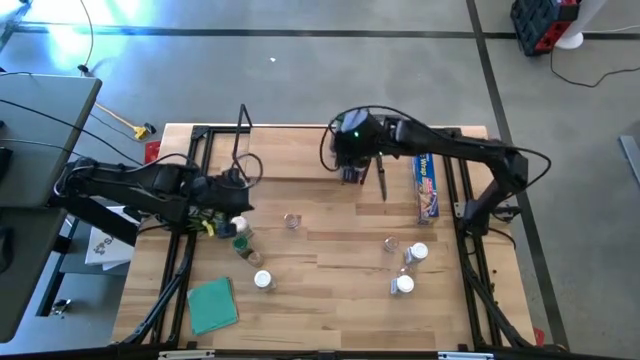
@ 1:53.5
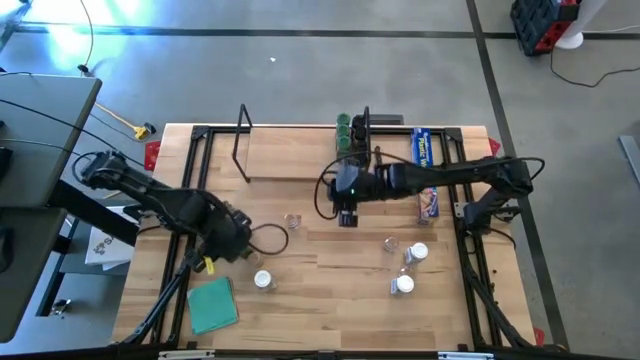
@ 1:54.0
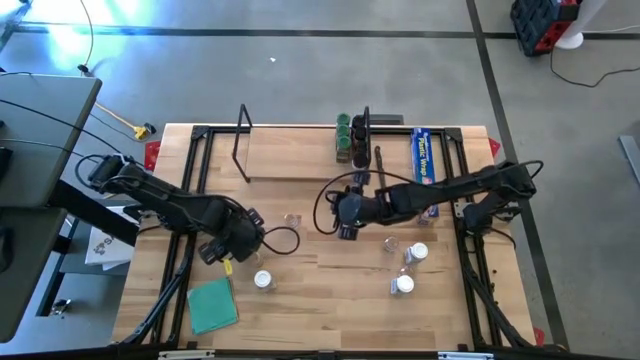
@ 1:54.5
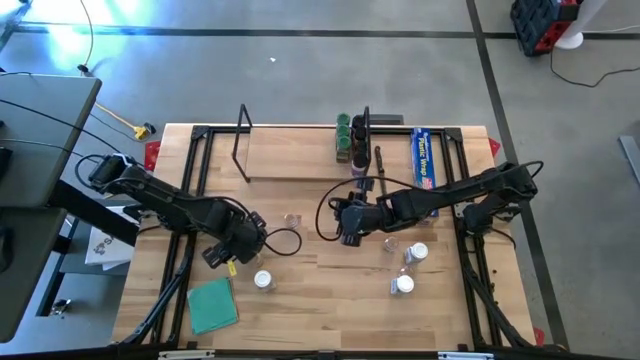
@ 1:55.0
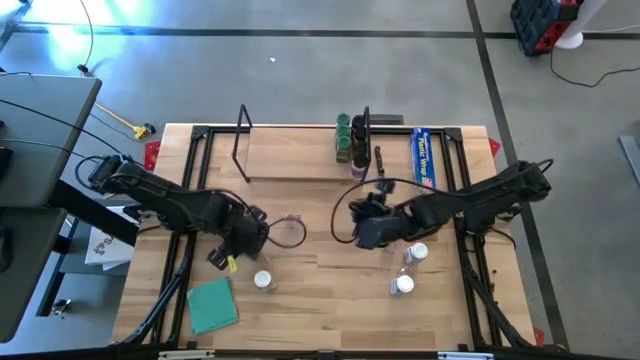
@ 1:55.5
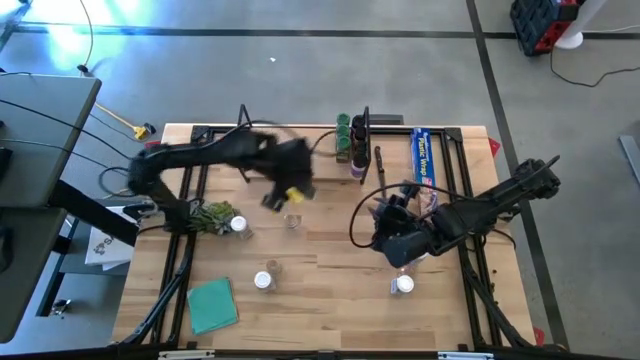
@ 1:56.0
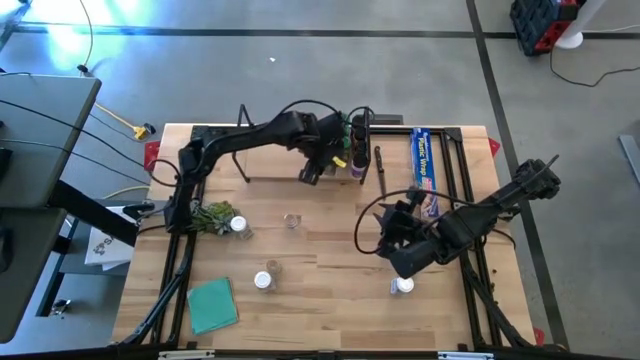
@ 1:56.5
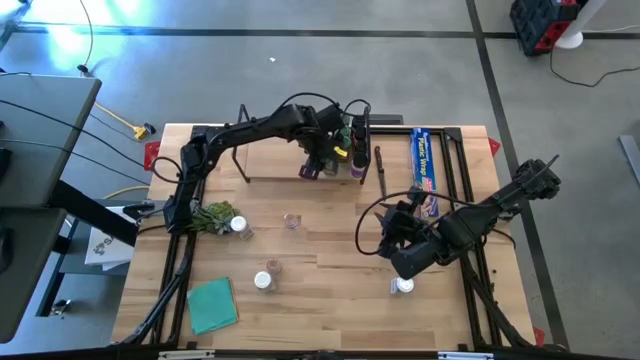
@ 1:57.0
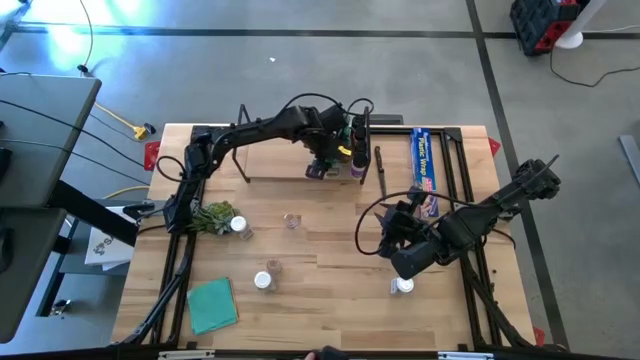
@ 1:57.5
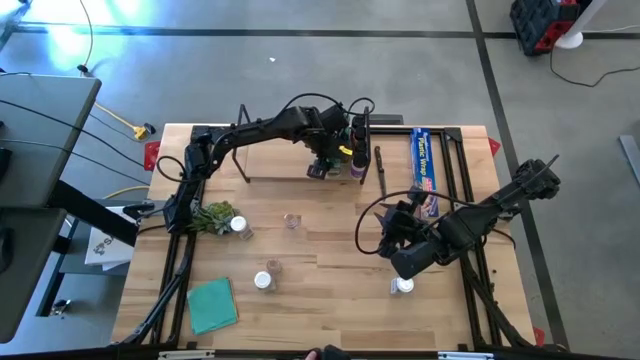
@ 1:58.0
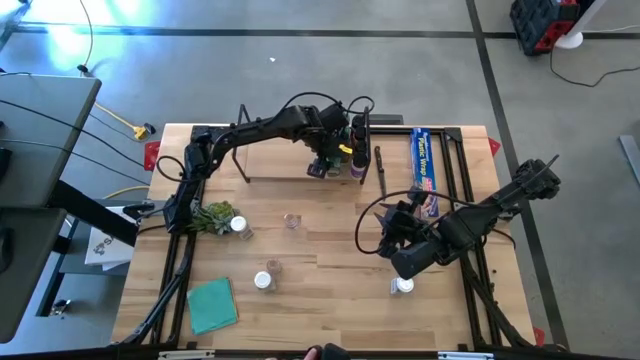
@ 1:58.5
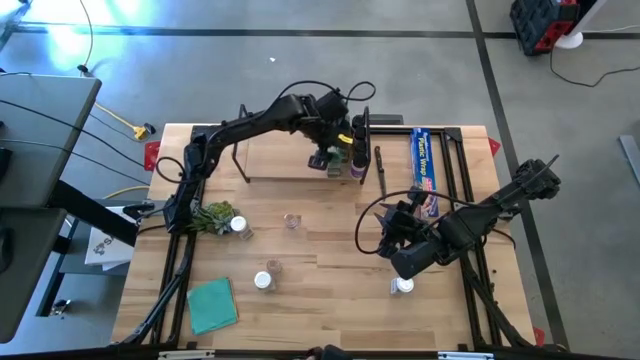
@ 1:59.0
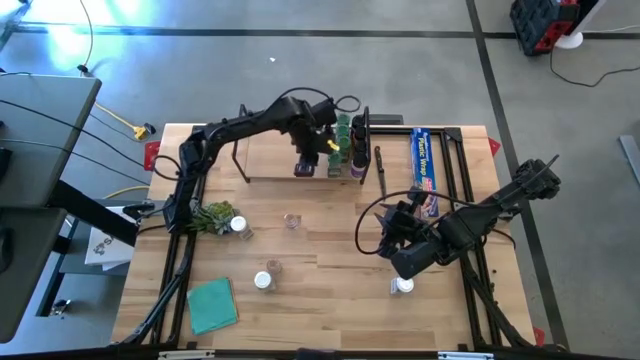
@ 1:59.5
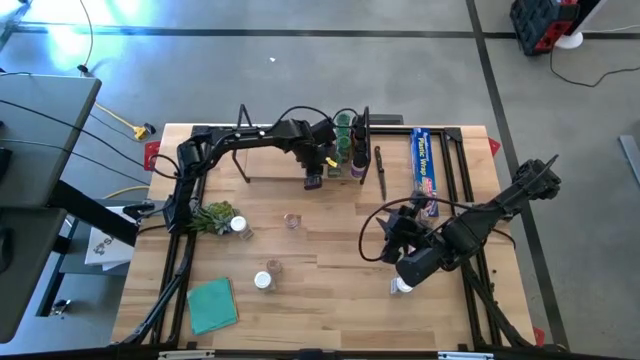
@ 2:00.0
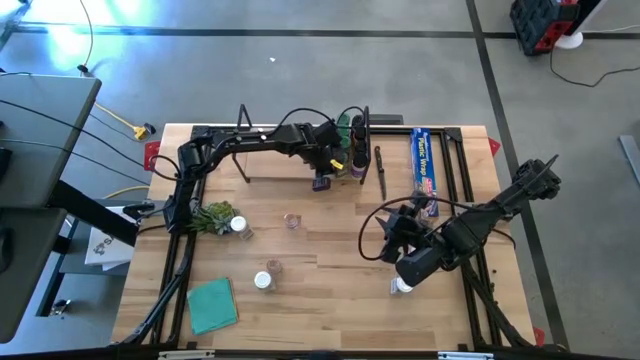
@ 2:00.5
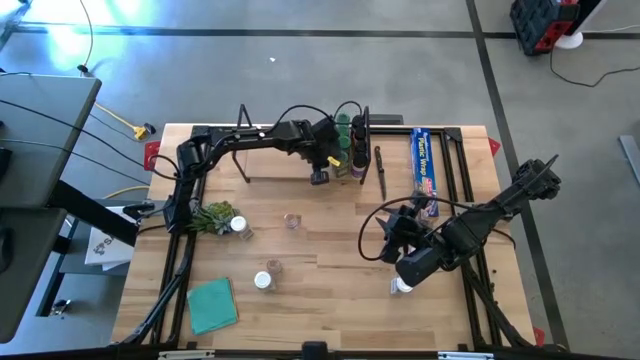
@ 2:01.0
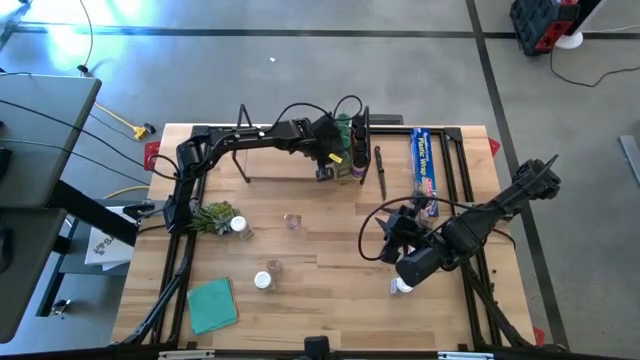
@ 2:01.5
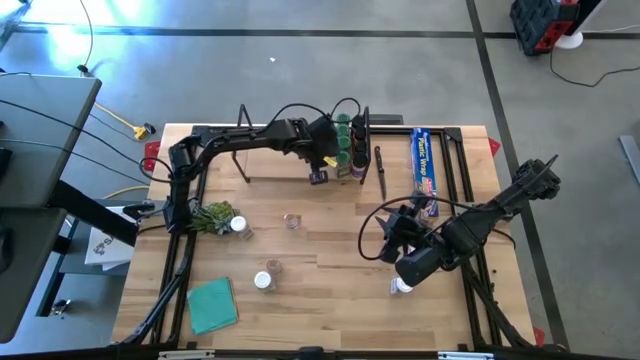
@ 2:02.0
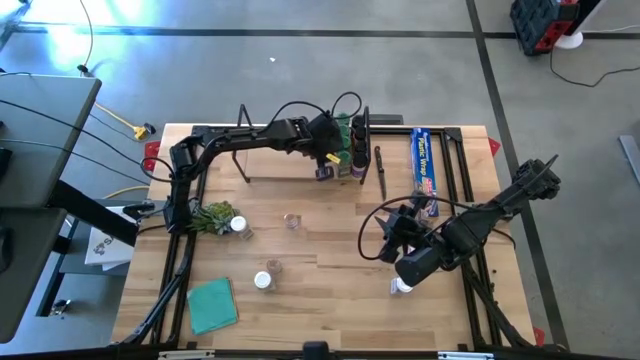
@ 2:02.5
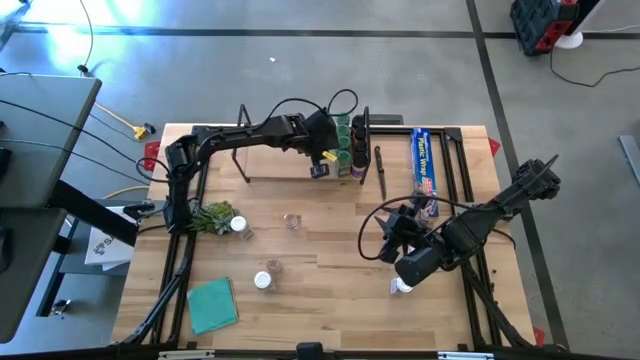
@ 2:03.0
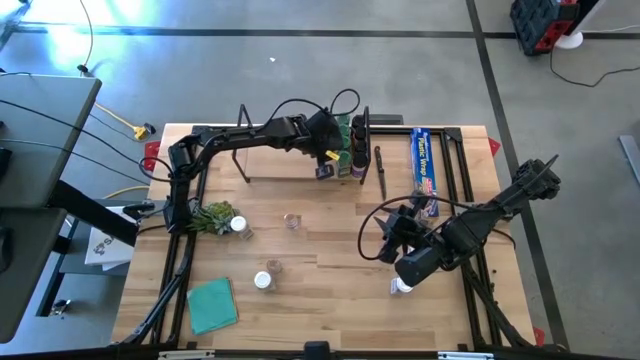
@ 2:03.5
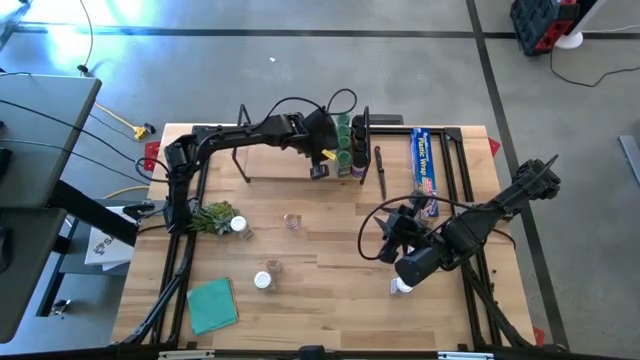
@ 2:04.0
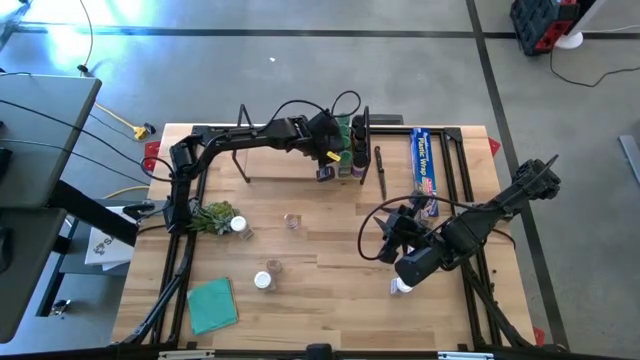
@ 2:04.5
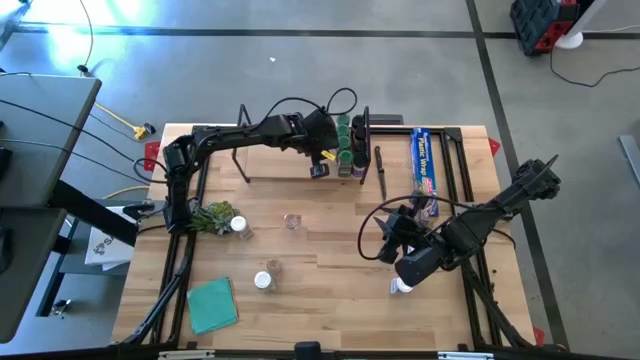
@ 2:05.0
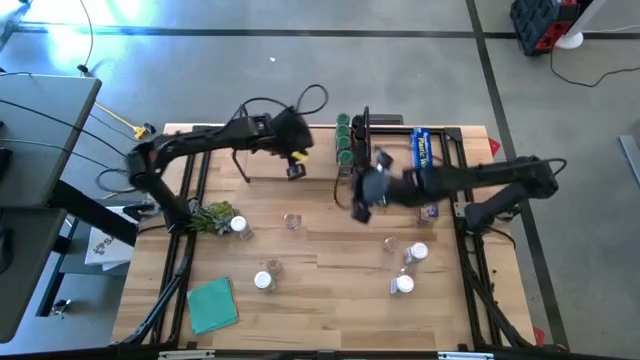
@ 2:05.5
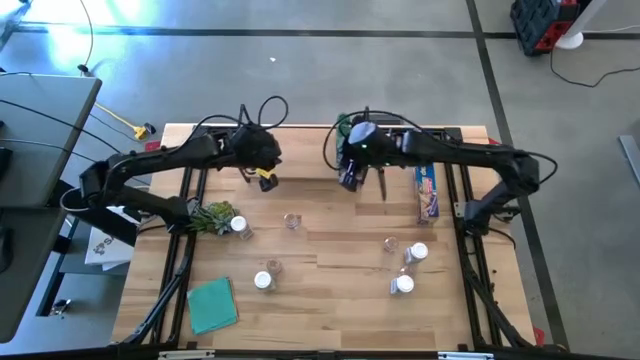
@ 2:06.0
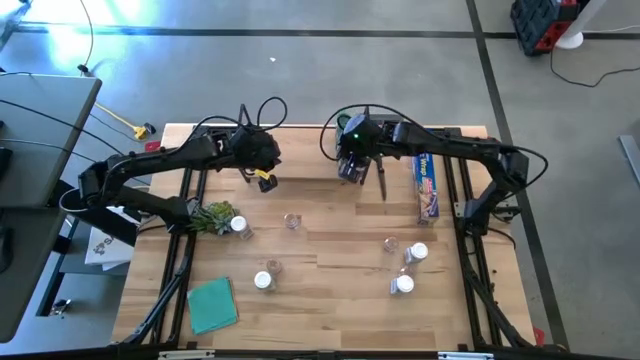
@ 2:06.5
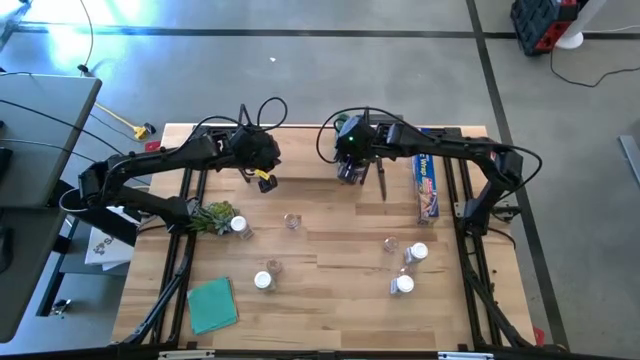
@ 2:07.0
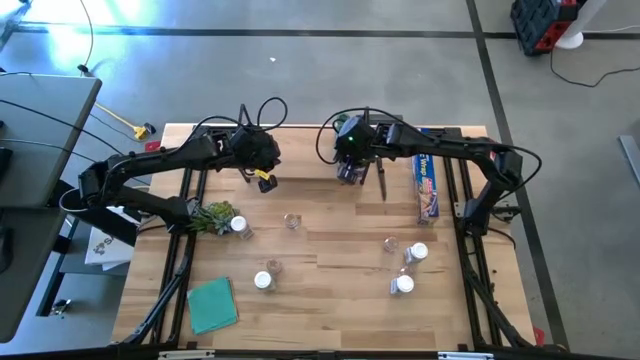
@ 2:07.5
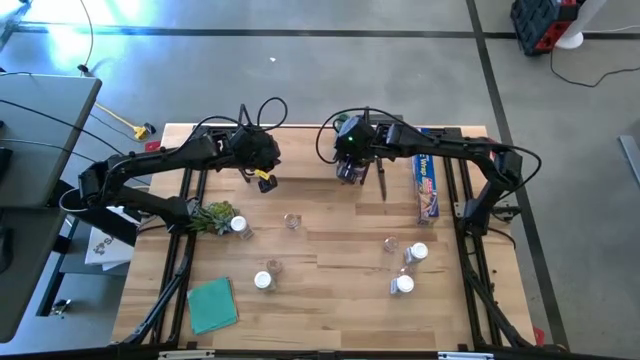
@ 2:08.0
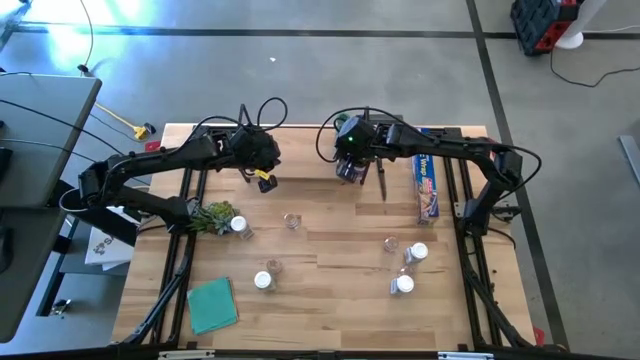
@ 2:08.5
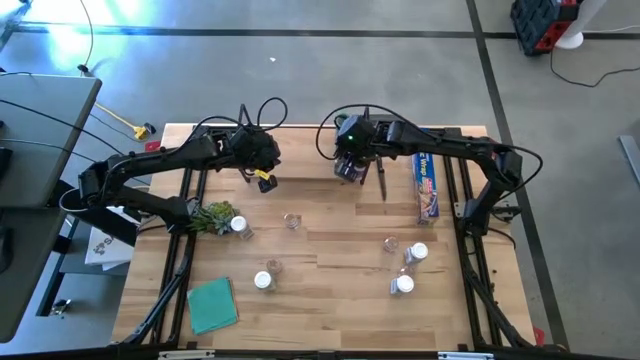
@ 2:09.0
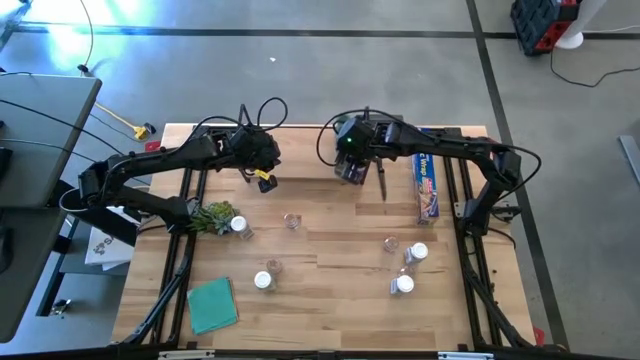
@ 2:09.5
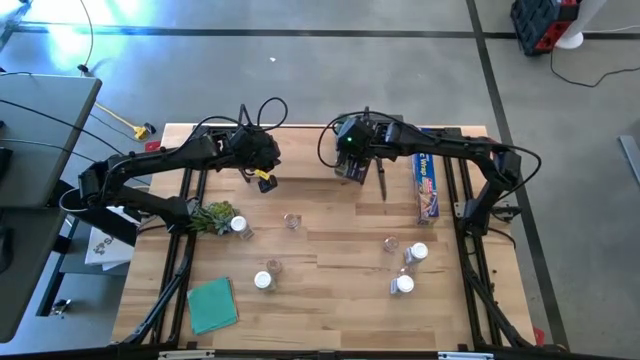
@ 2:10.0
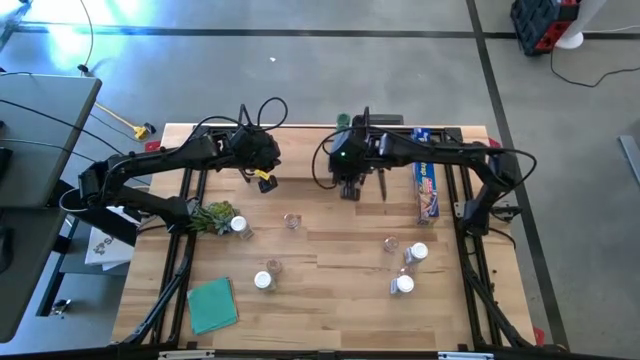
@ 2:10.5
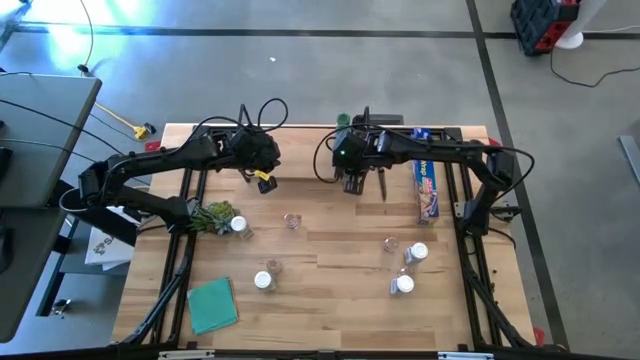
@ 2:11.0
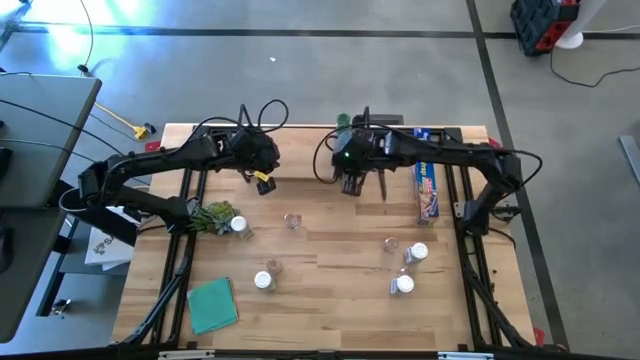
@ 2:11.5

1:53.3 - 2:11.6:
Task: Shelf spices
Put the green seasoning bottle on the shelf aligned with the other green seasoning bottles

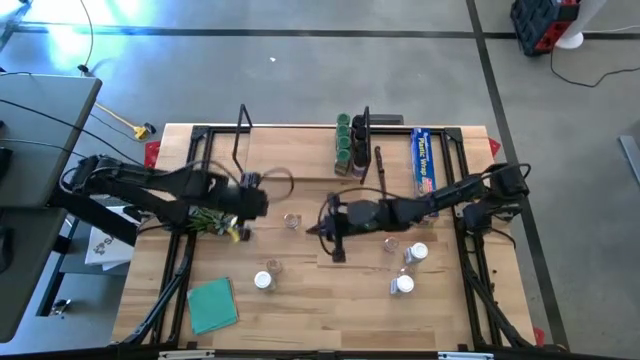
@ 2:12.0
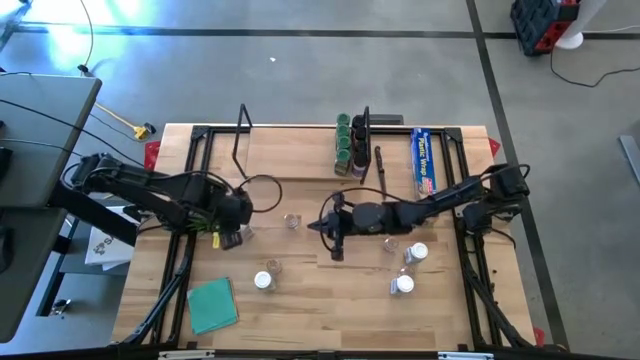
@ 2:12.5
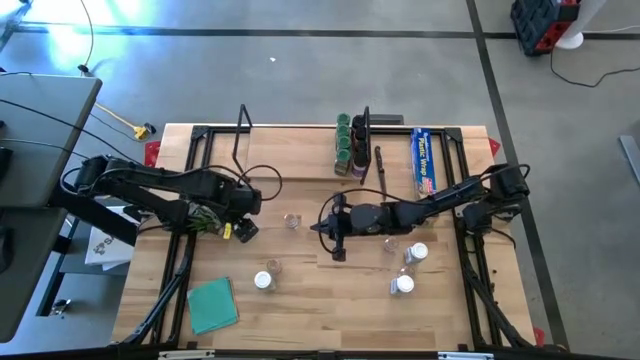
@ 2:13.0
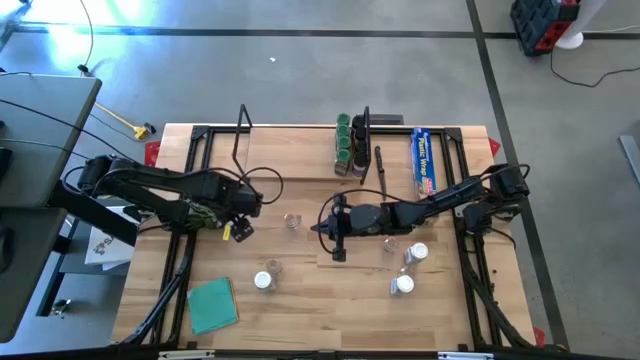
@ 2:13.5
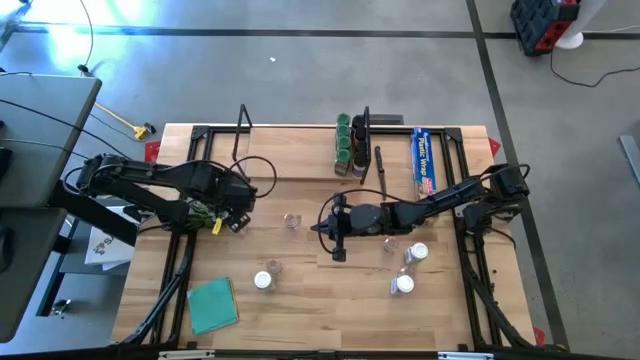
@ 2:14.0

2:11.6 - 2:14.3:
Put the white seasoning bottle on the shelf
